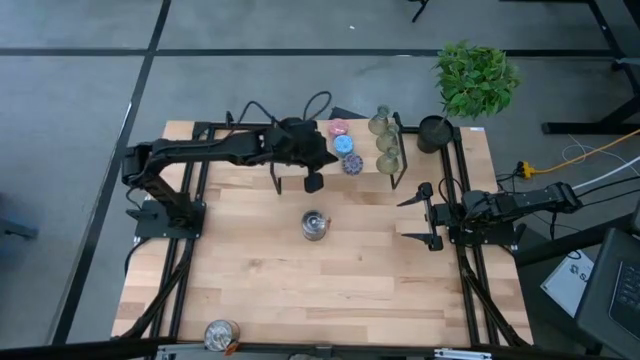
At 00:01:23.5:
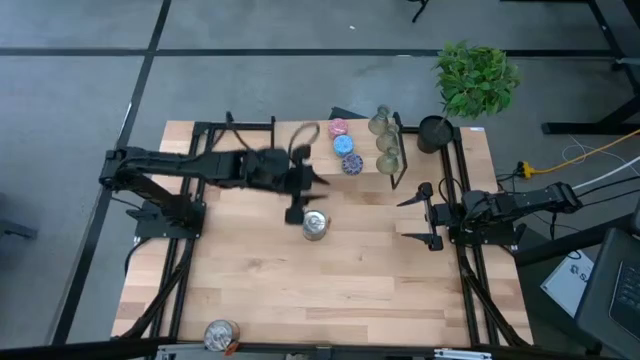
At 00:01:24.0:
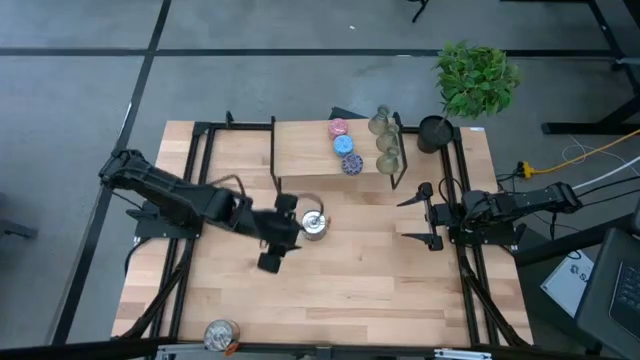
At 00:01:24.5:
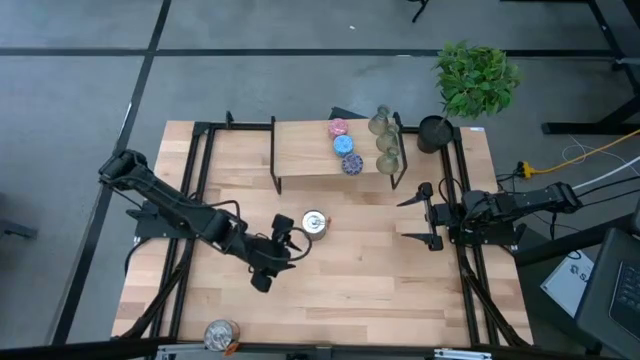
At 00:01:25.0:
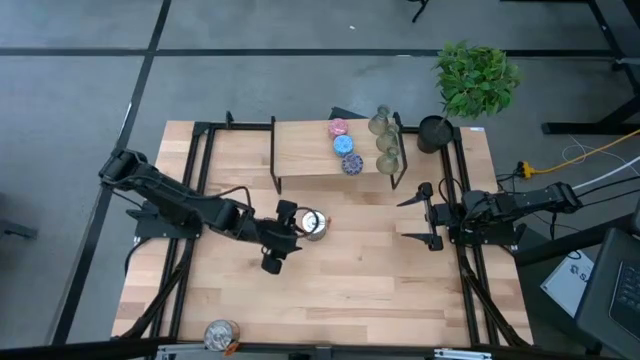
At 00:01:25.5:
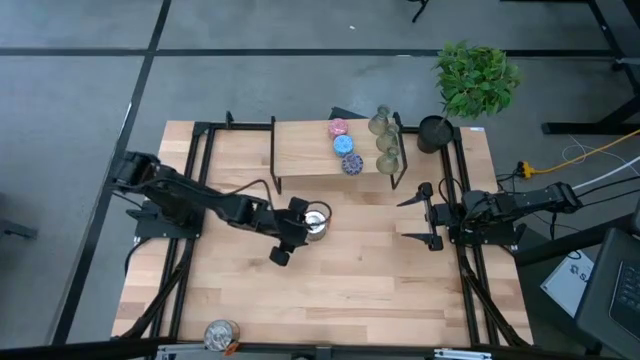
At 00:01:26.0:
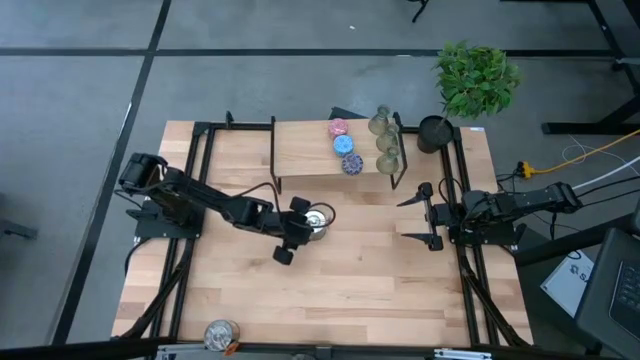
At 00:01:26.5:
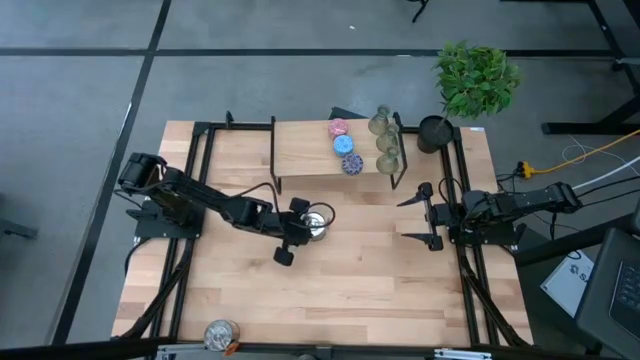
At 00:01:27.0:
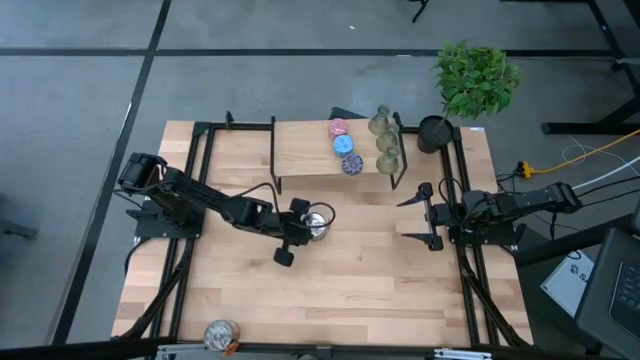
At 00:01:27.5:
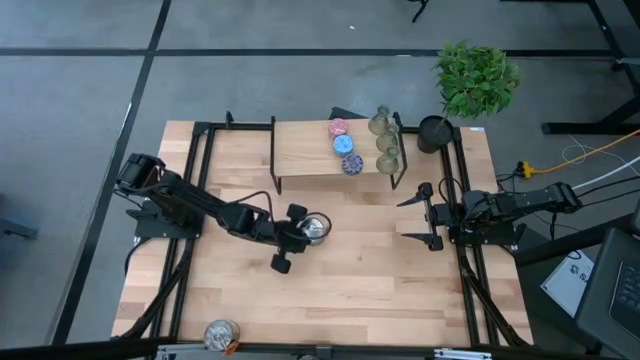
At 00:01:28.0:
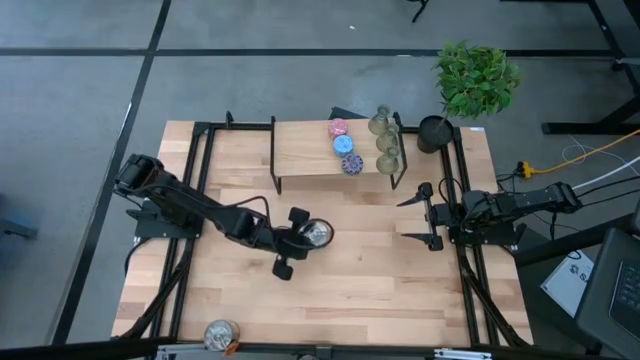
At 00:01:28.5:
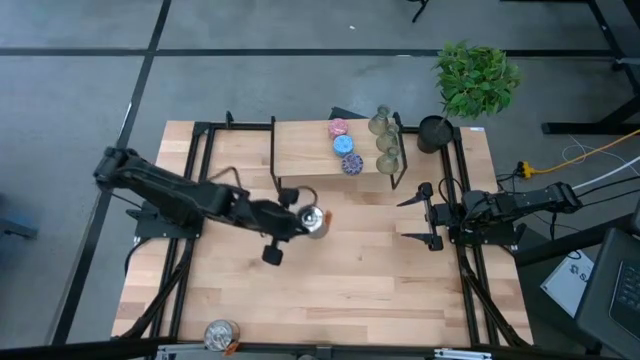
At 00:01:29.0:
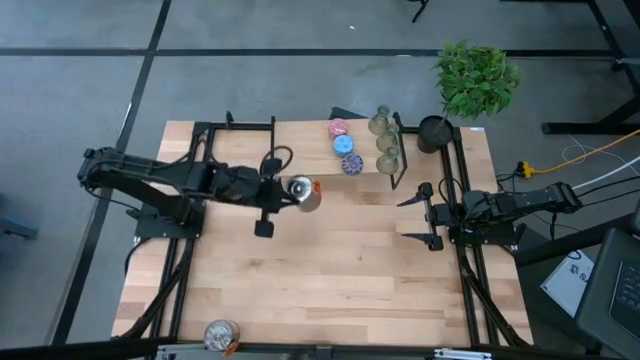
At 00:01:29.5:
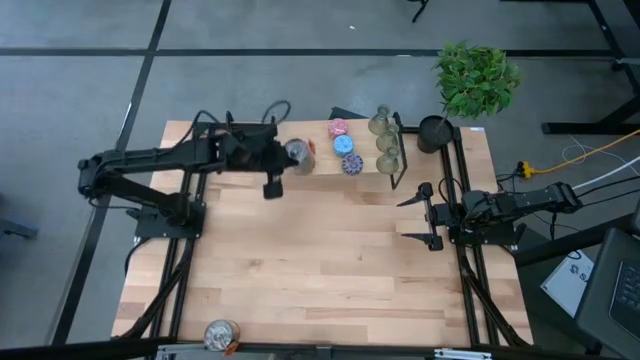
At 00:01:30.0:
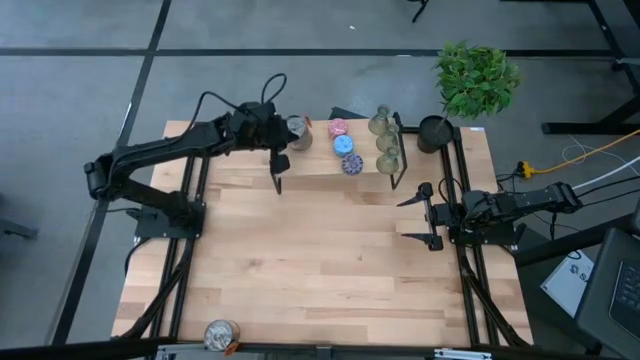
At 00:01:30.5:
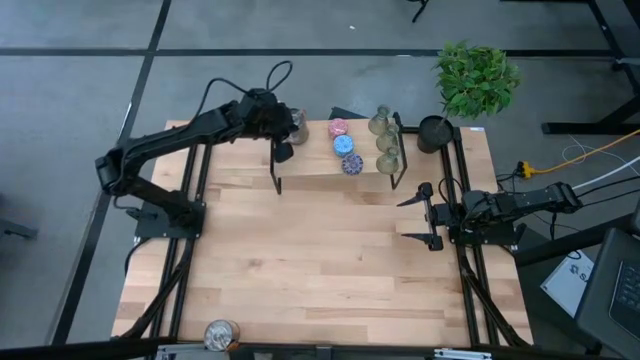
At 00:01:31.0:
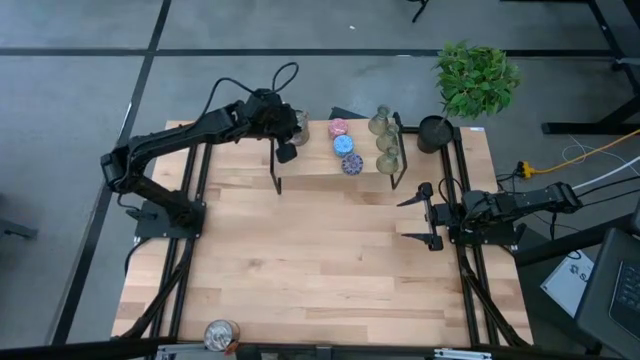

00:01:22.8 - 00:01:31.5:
Task: Pick & Place candle stick holders
Put the top silver scented candle on the shelf

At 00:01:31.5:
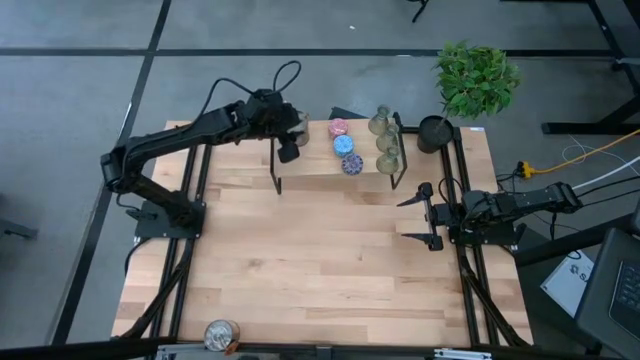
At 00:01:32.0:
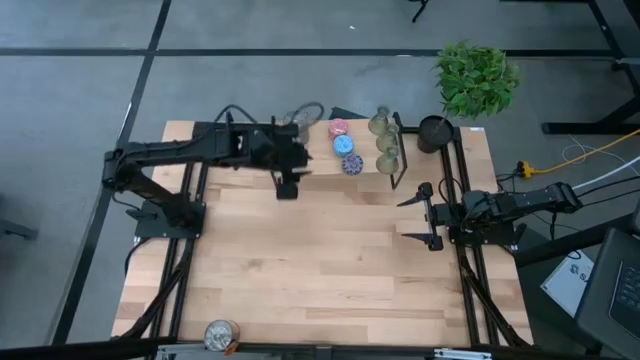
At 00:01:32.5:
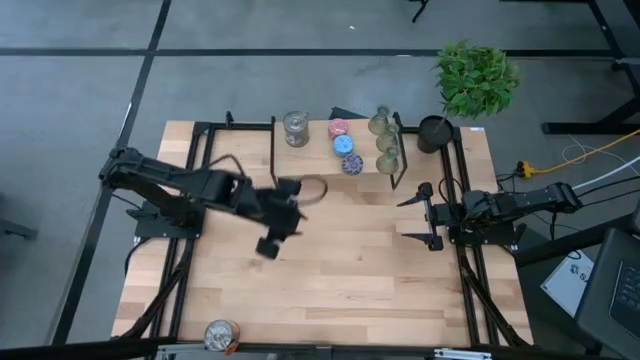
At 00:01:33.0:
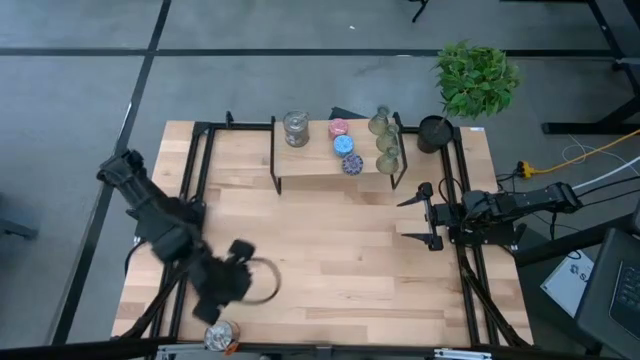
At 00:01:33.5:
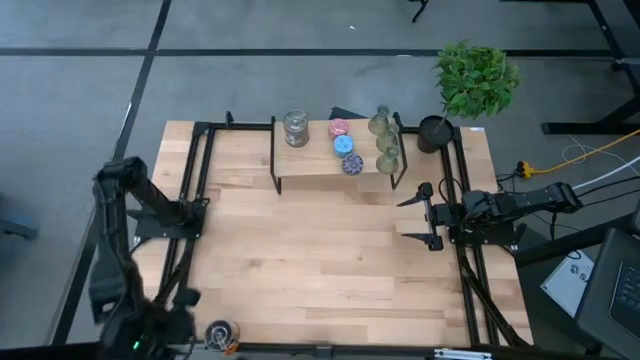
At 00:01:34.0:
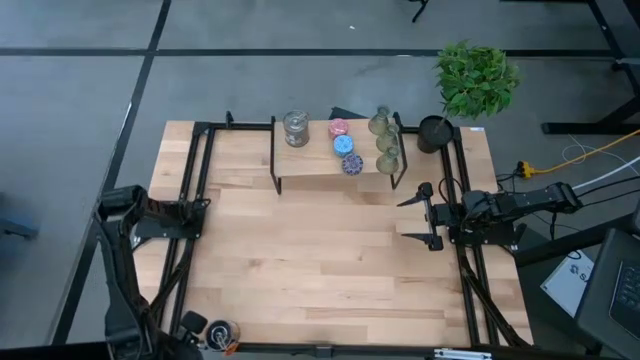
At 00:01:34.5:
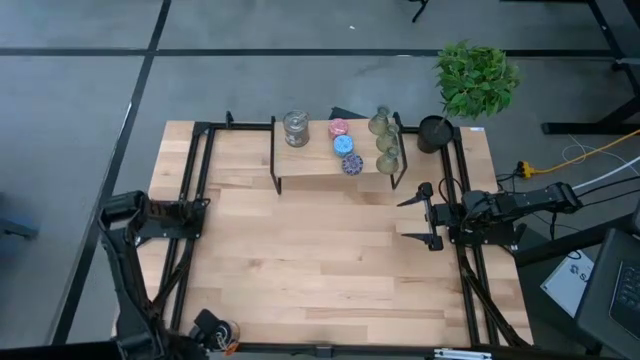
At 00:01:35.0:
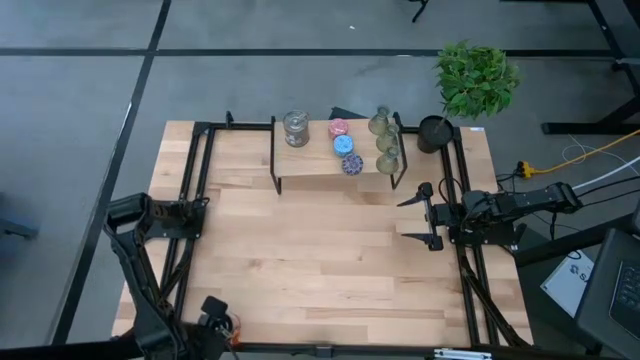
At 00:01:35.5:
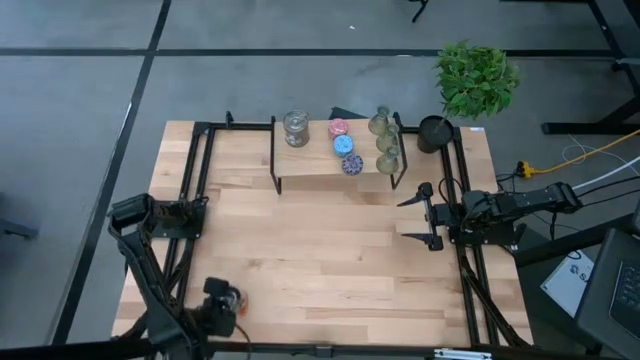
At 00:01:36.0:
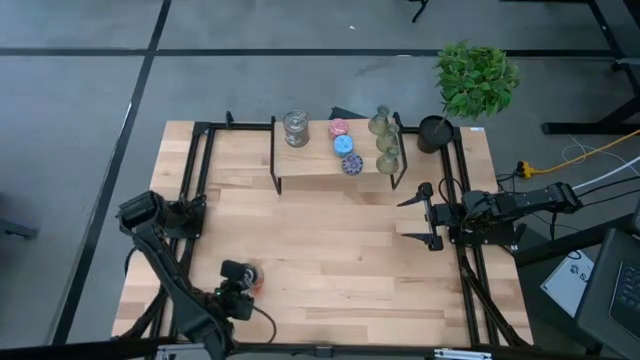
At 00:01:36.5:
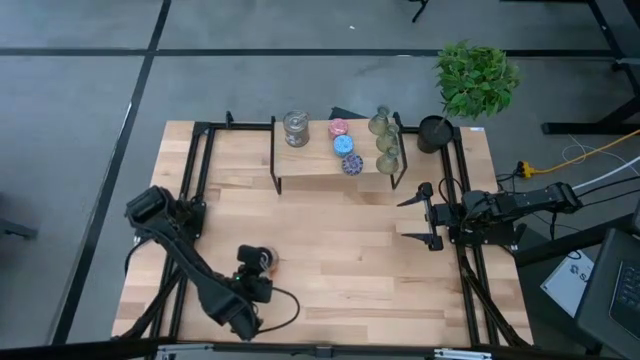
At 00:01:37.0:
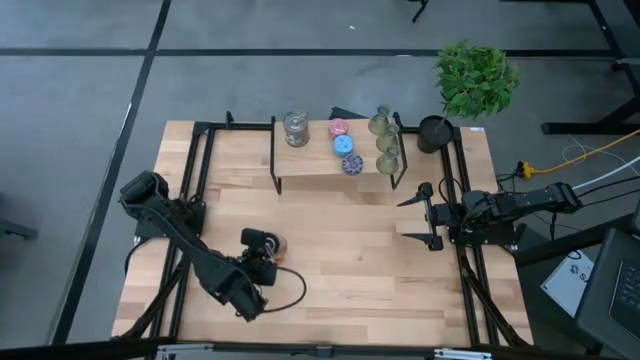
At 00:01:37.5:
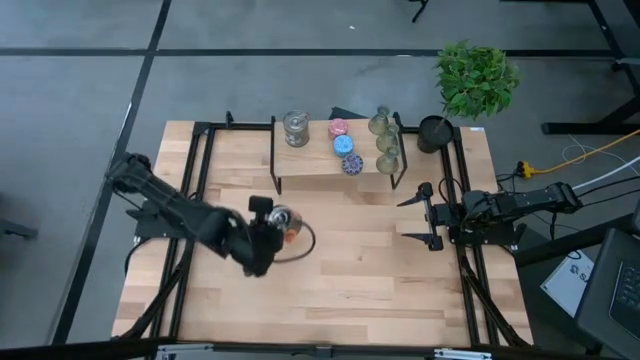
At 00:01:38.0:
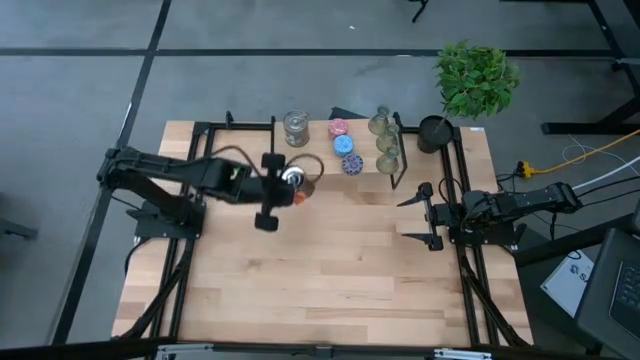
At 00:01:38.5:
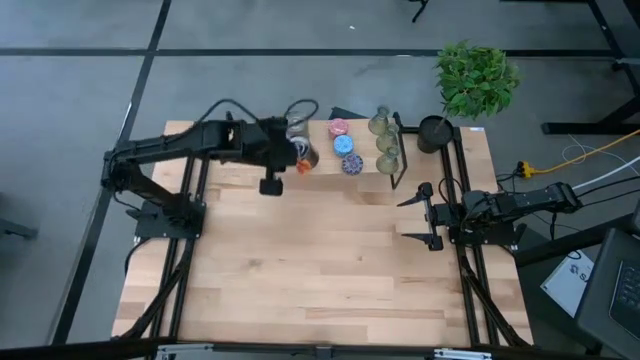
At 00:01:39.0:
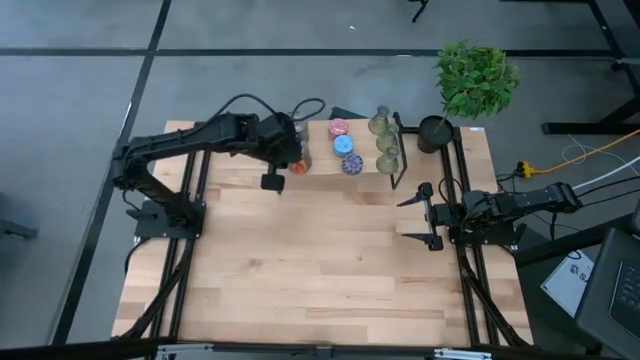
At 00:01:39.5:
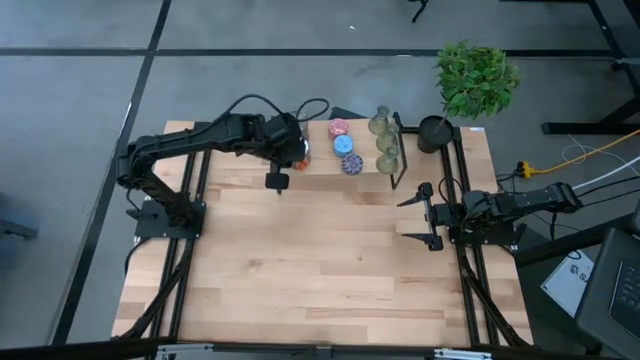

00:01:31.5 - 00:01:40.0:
Put the silver scented candle on the shelf aligned with the other silver scented candle

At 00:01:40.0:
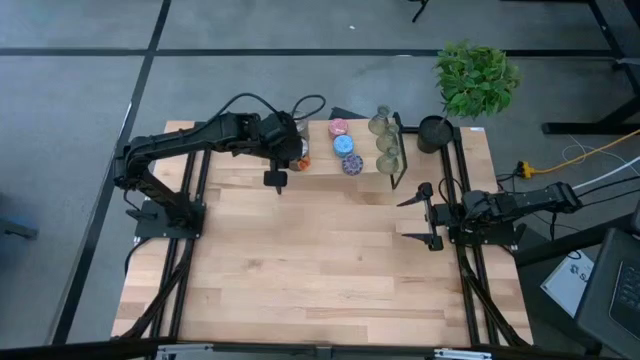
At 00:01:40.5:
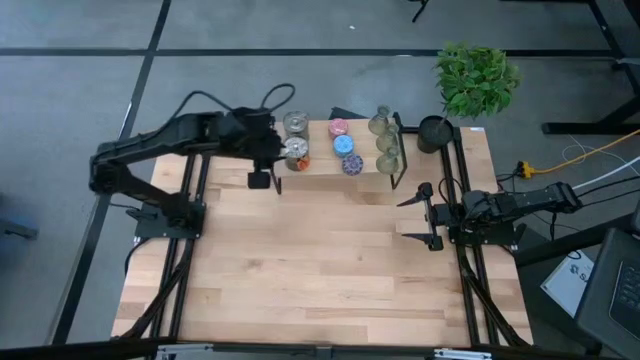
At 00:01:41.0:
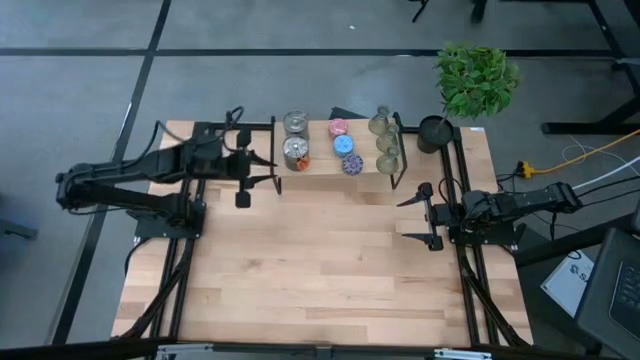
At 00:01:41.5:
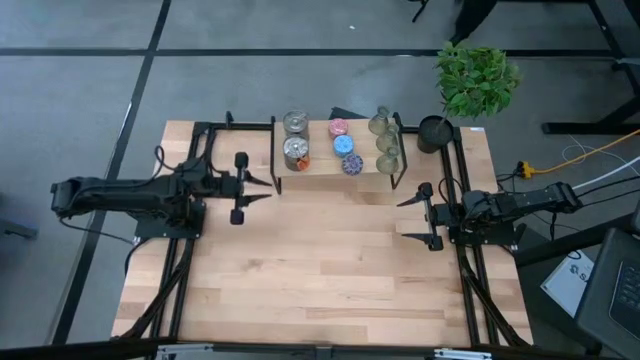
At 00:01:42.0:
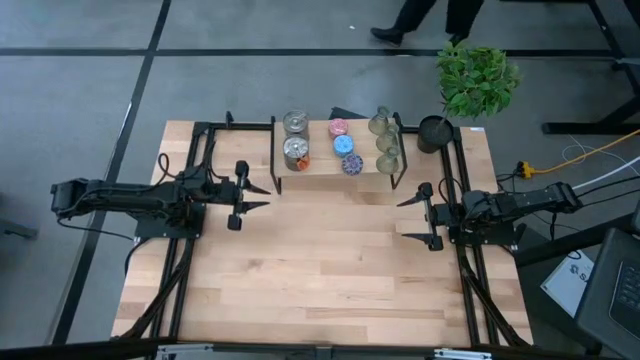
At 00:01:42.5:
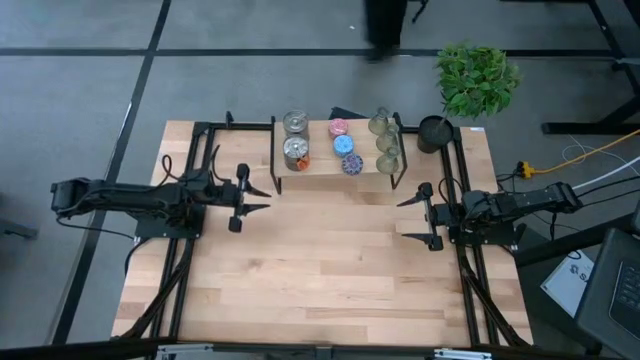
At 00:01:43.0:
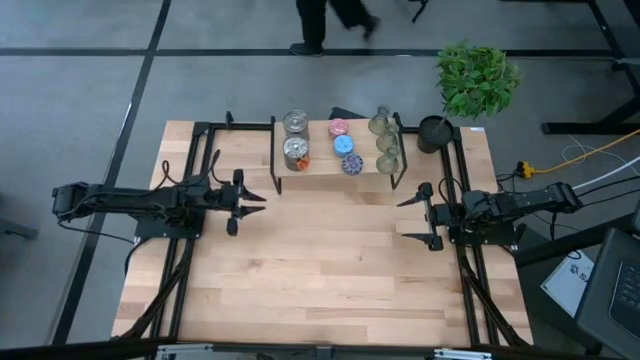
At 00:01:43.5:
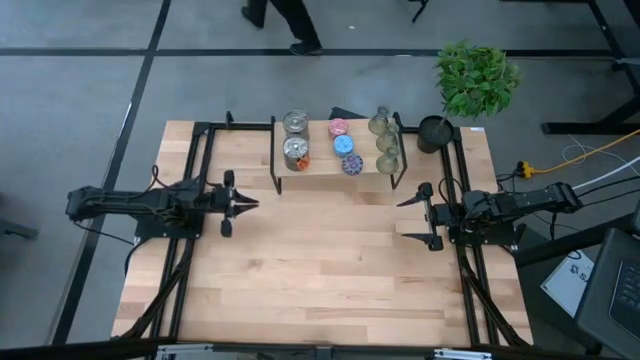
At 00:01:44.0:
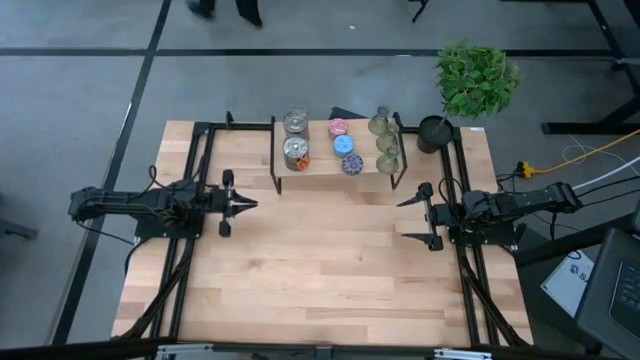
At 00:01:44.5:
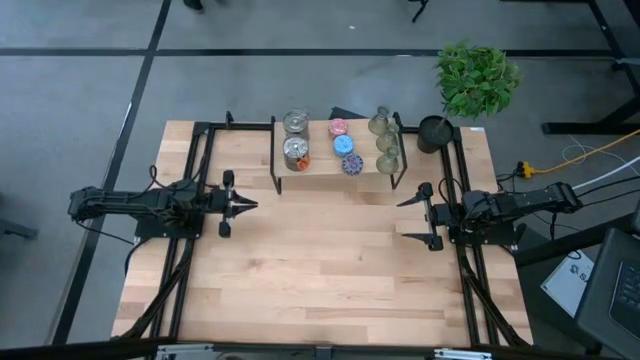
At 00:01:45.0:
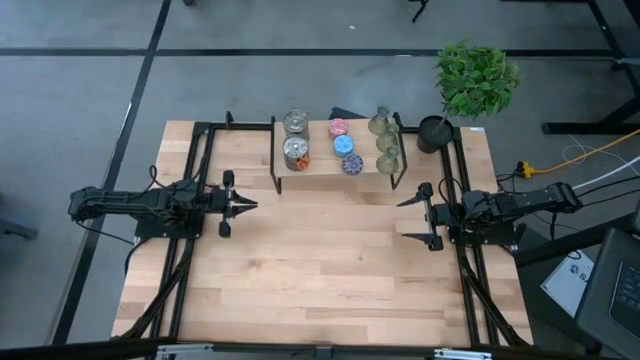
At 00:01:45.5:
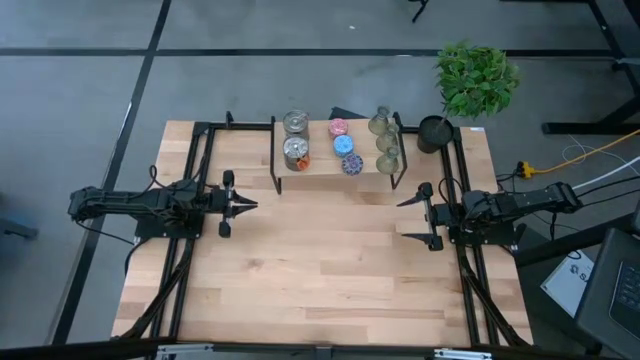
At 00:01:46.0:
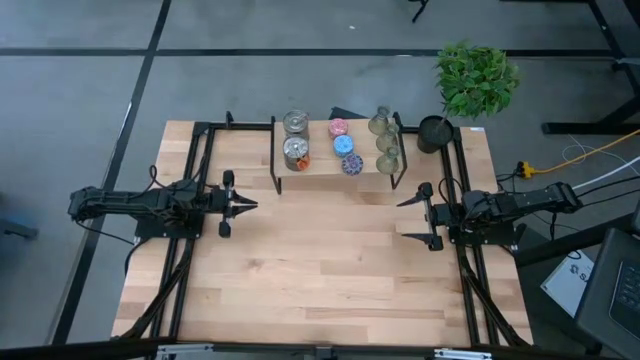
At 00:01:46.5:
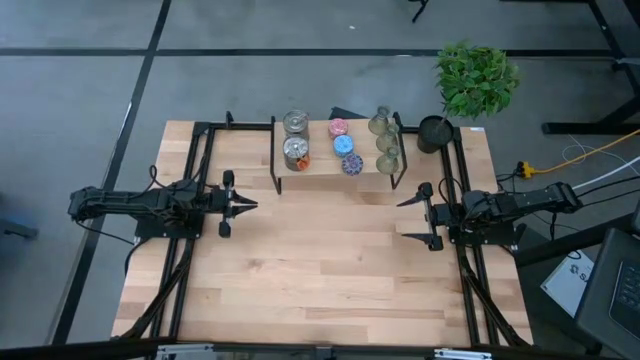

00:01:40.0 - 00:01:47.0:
Return to Home Position
